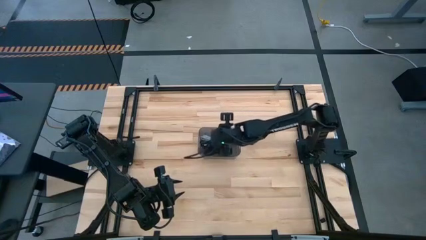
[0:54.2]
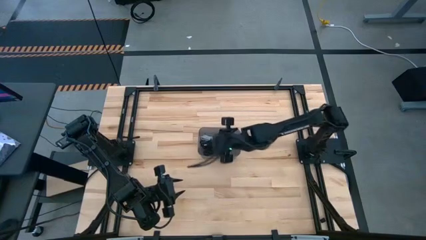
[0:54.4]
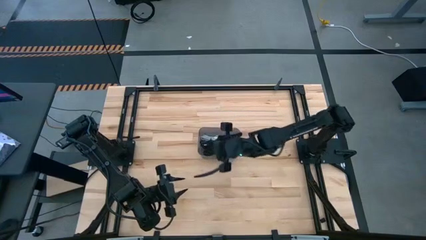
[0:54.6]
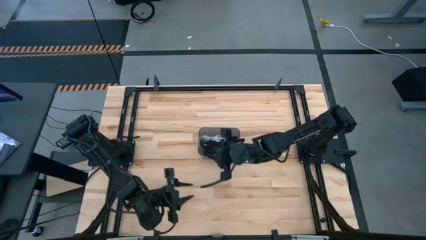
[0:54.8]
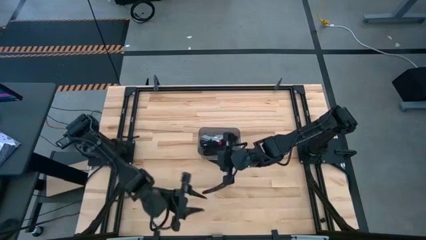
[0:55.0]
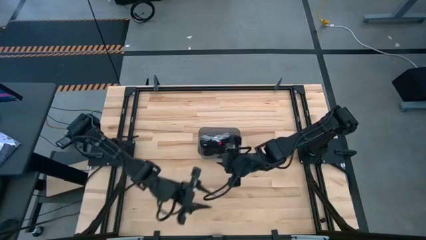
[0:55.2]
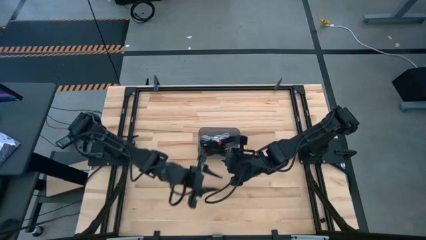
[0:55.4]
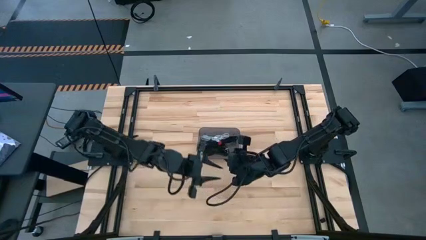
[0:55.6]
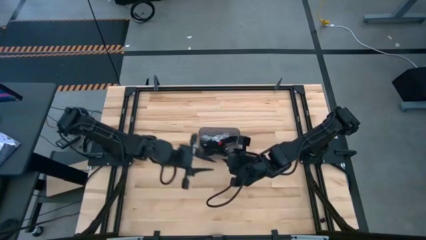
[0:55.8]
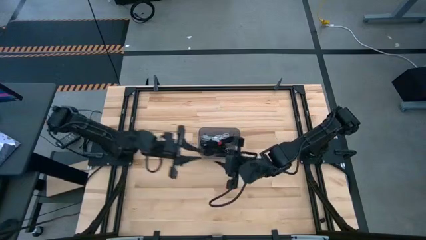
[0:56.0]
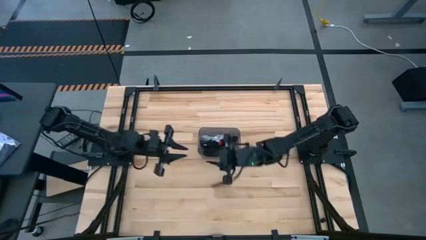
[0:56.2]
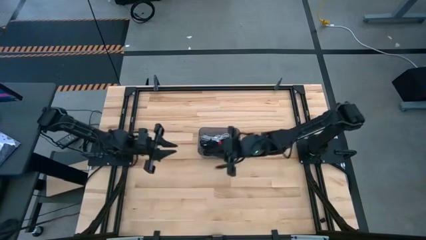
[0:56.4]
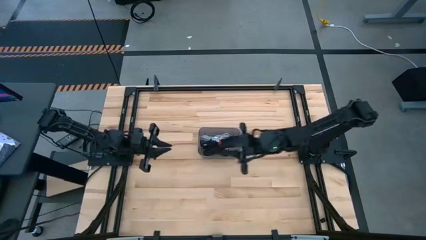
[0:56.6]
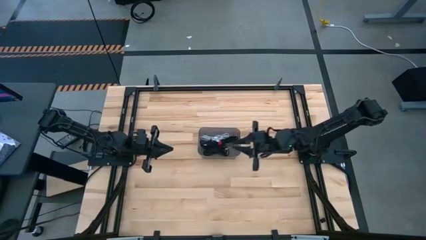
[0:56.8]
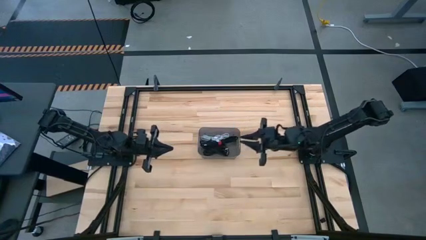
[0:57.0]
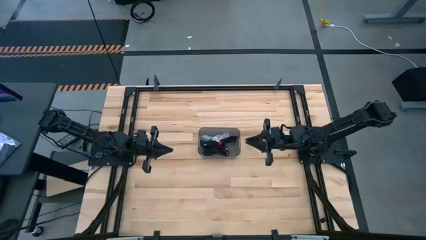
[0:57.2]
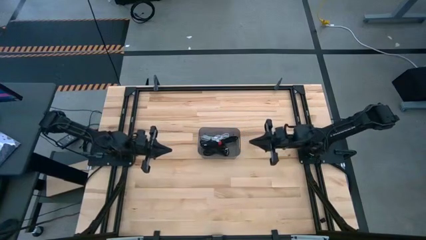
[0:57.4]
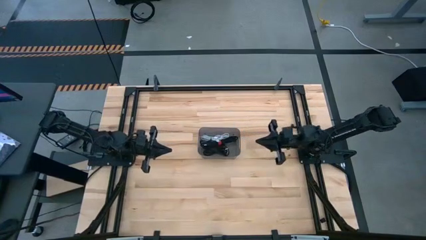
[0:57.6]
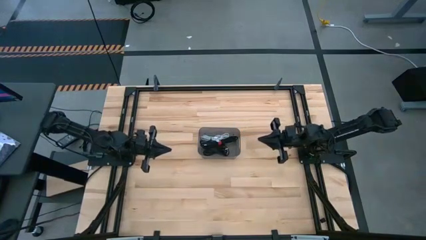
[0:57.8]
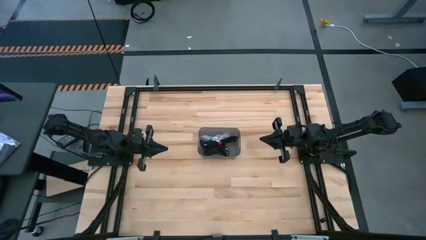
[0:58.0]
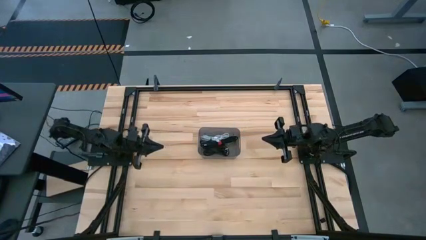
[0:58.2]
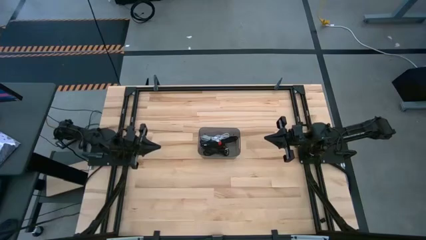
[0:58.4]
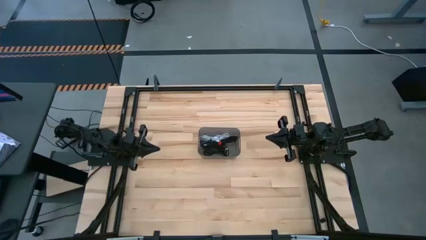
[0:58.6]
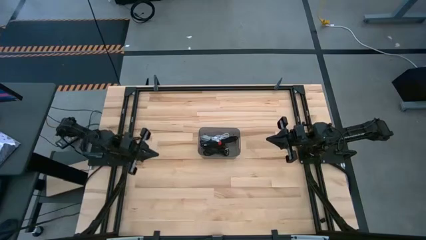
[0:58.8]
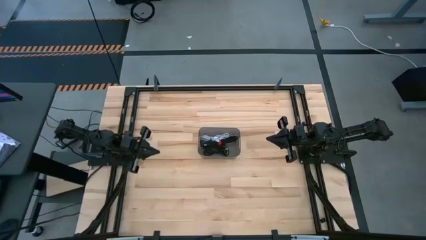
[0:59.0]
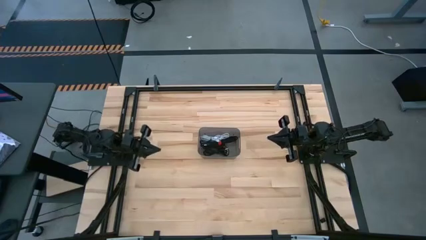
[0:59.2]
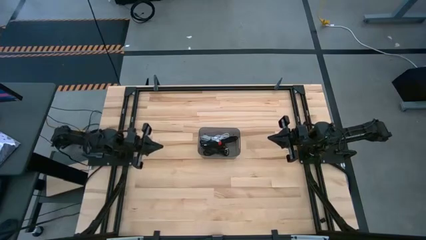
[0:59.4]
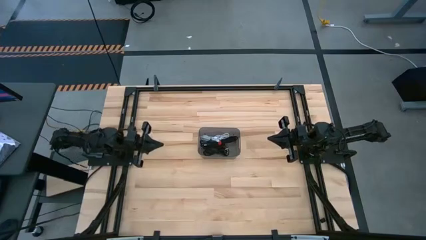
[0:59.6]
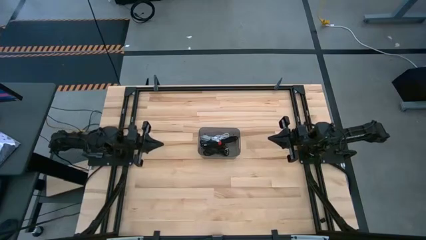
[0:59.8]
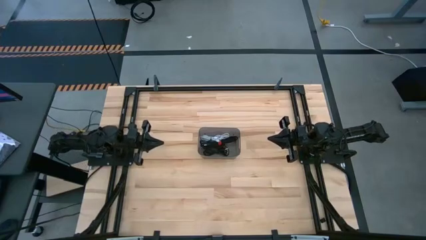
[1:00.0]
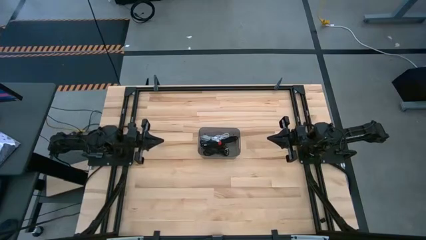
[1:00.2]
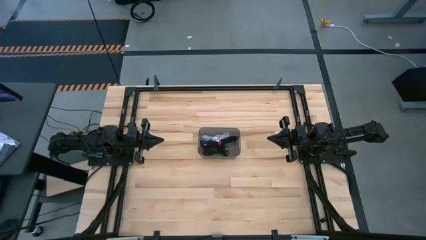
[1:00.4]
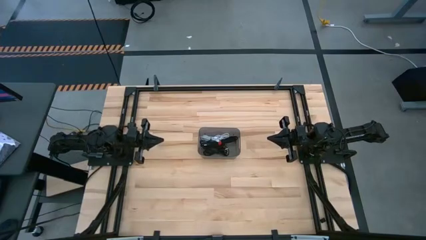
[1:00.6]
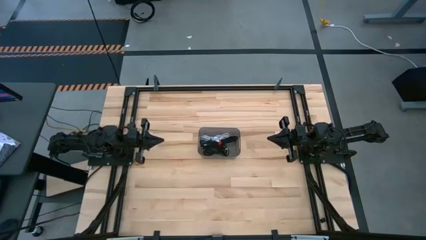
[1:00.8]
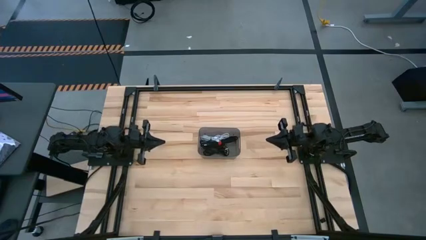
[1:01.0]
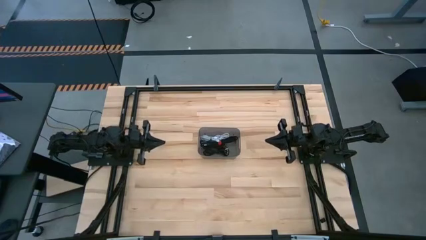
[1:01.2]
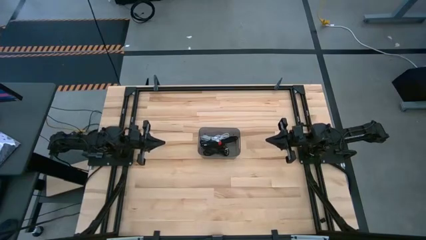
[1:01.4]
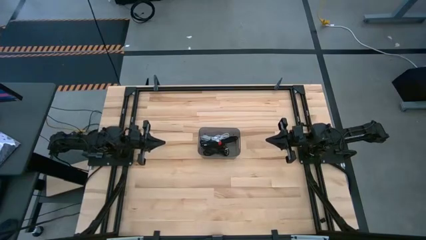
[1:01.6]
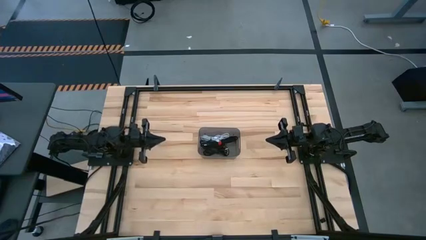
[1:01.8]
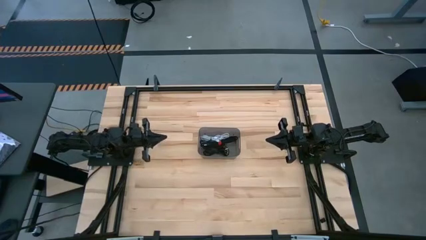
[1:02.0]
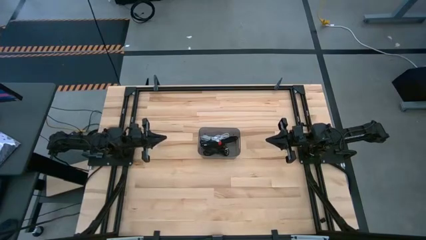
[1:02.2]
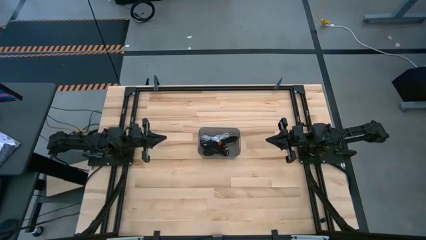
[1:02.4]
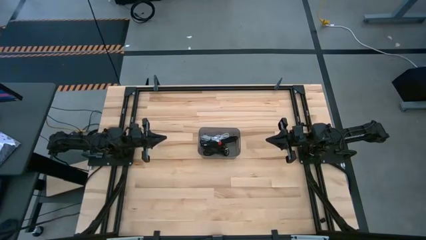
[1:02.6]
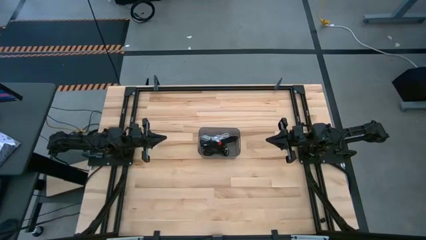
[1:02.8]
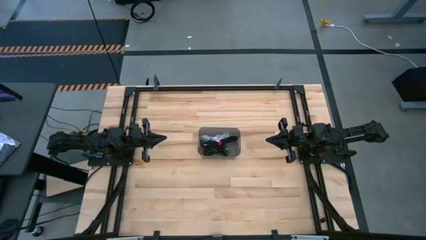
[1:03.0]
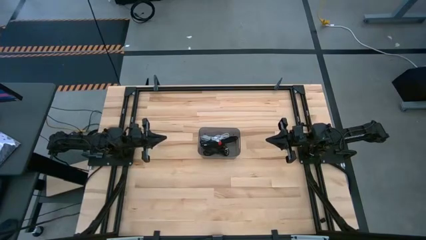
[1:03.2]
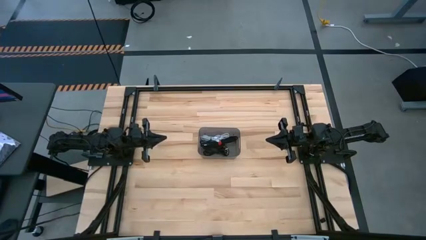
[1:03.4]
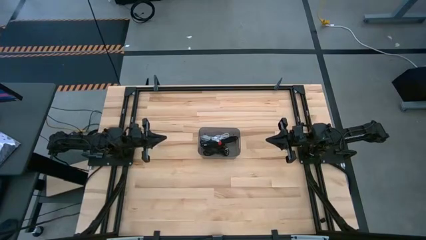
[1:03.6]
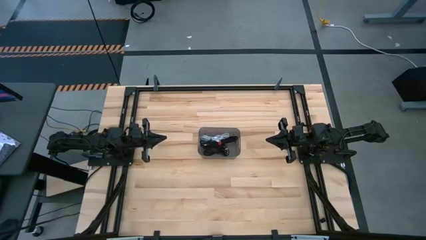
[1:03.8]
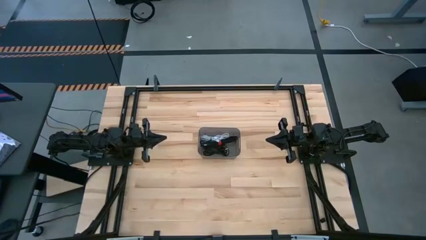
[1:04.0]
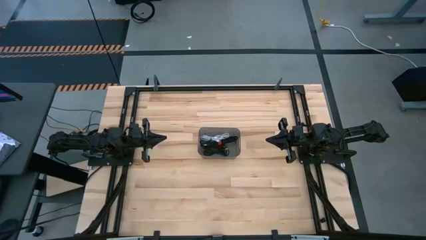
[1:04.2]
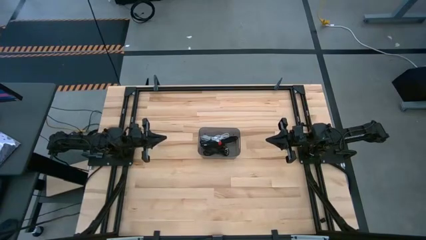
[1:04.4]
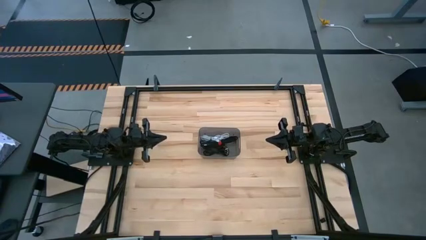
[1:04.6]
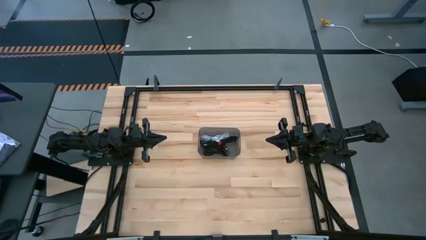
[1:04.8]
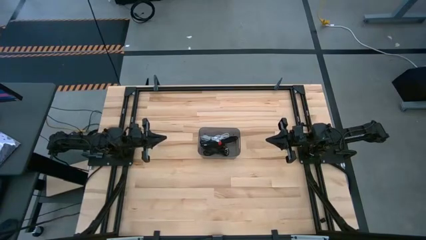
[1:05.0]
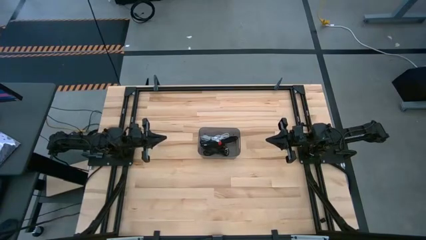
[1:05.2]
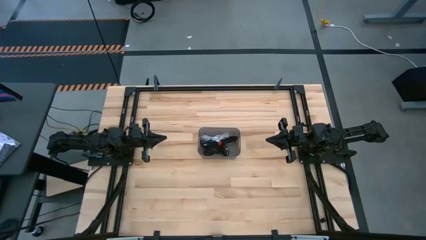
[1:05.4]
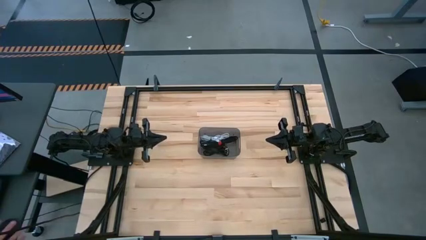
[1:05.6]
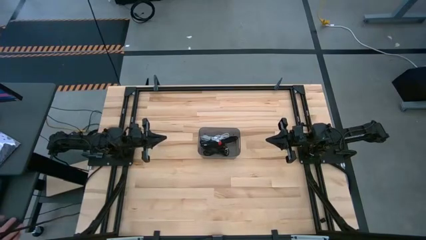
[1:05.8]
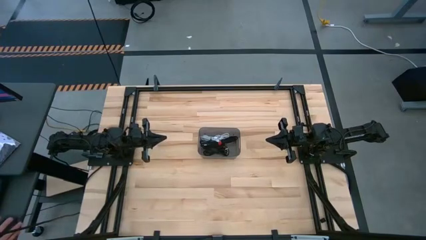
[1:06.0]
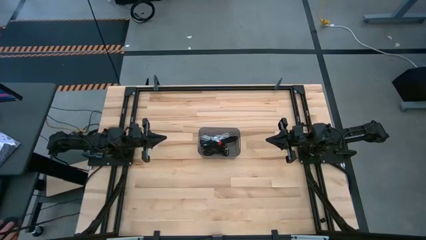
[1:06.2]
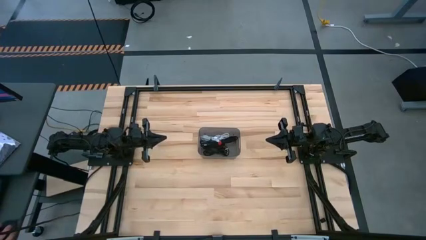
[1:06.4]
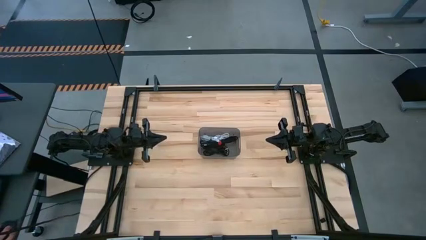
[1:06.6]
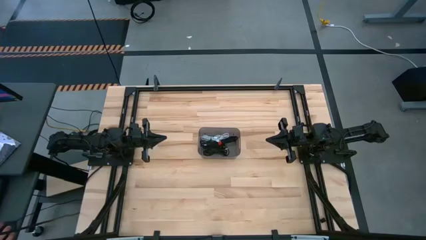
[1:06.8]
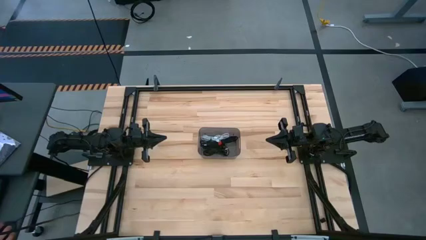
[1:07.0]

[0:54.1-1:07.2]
Task: Pick and place USB-C Cables
Return to Home Position

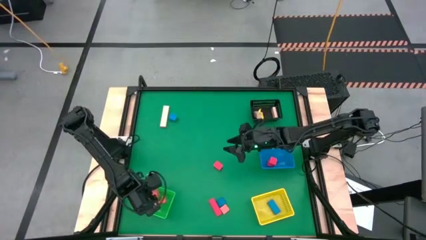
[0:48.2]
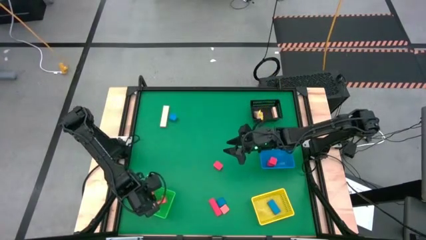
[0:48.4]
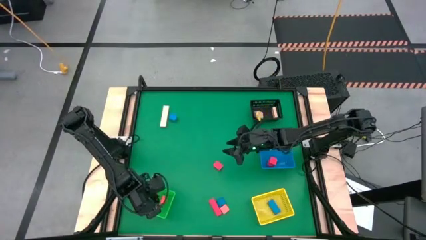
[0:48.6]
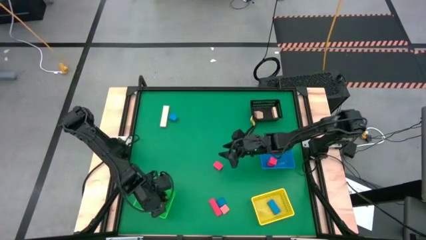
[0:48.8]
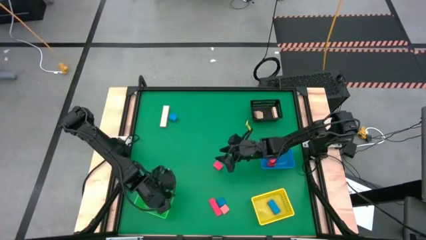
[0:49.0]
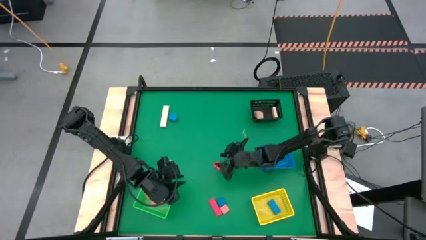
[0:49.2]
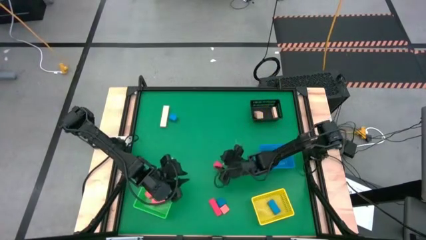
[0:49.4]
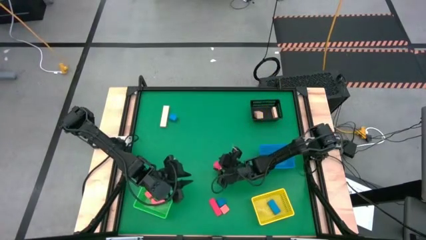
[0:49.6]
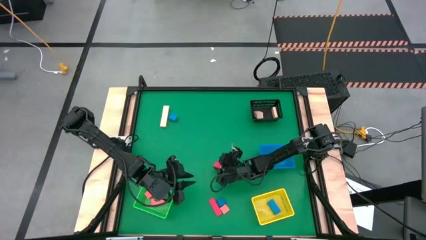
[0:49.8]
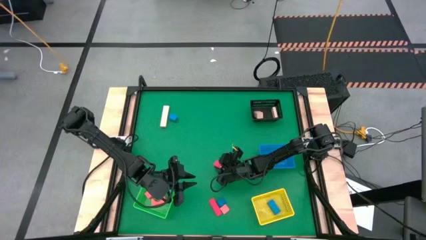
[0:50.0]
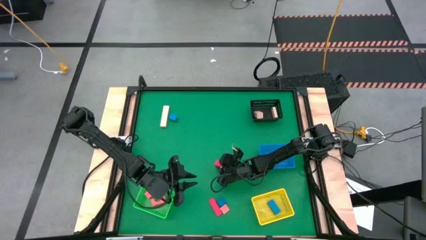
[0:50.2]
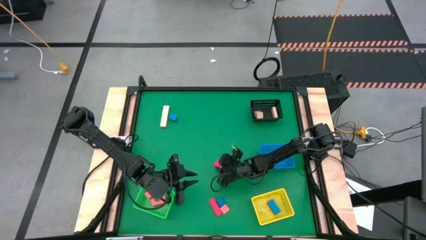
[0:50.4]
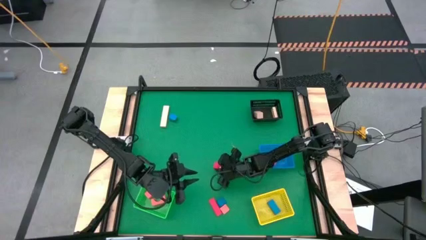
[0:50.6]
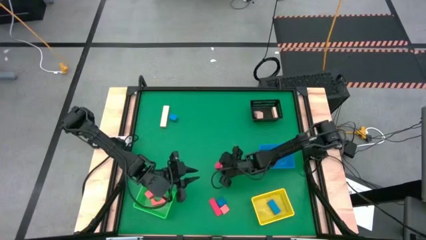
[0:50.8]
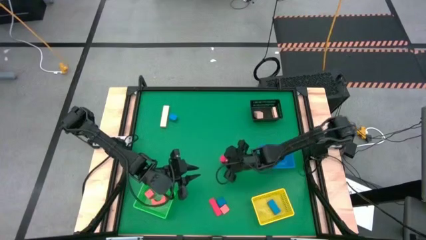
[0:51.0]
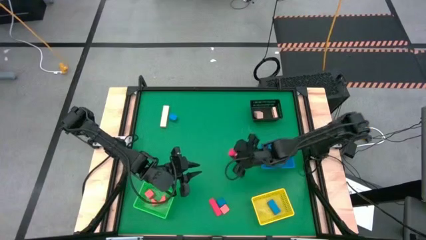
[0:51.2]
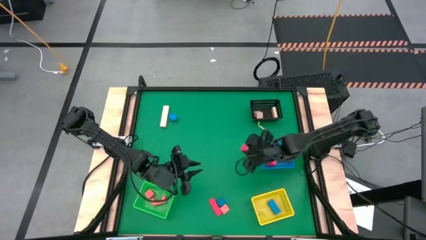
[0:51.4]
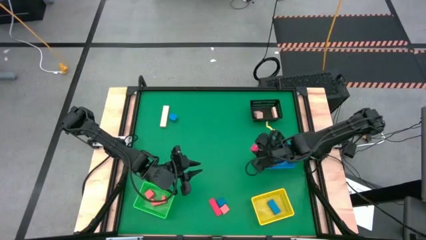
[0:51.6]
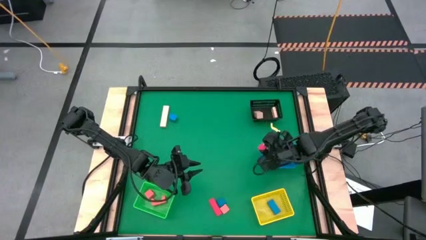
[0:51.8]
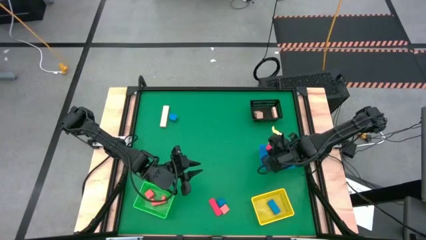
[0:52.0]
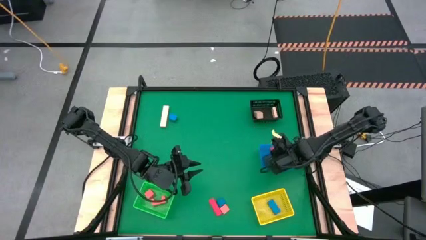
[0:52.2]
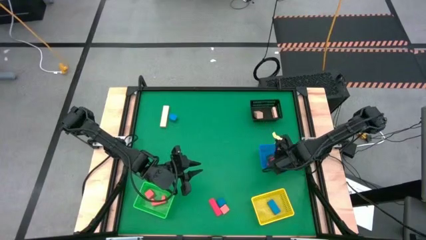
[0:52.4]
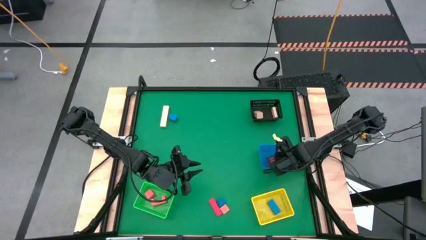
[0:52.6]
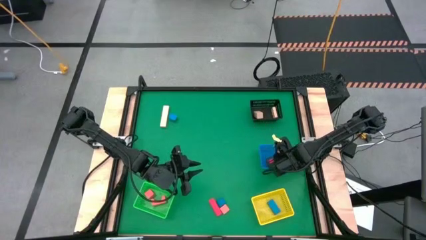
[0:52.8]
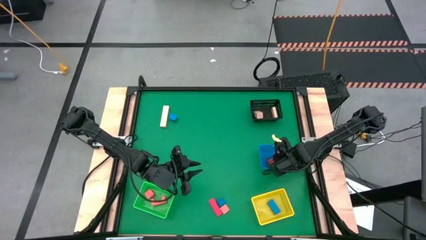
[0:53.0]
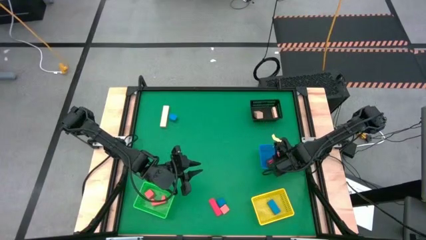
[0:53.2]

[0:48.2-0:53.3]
Task: Sort & place blocks by color
Put the red block into the blue bin
